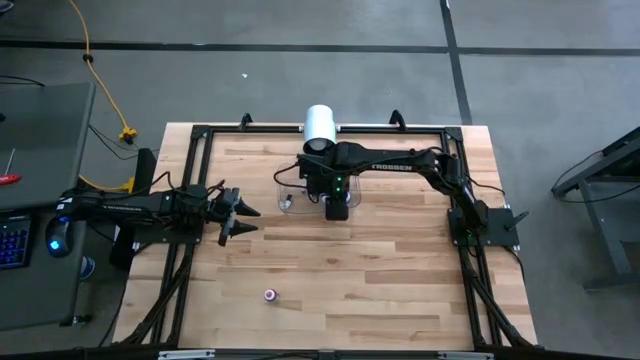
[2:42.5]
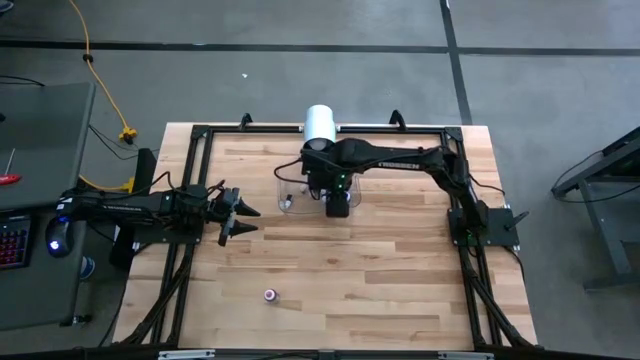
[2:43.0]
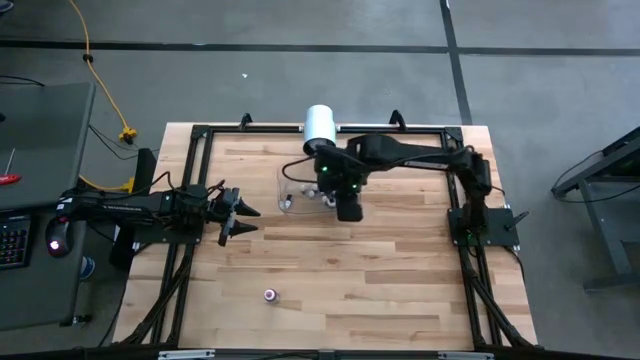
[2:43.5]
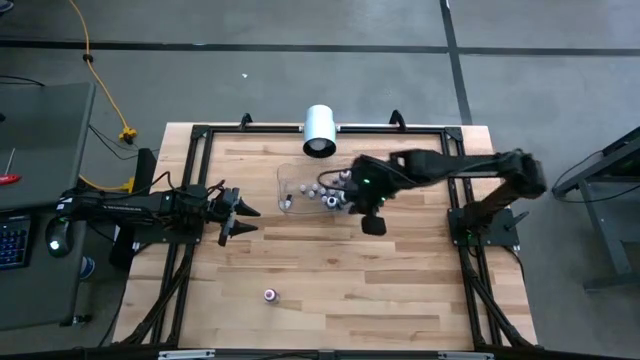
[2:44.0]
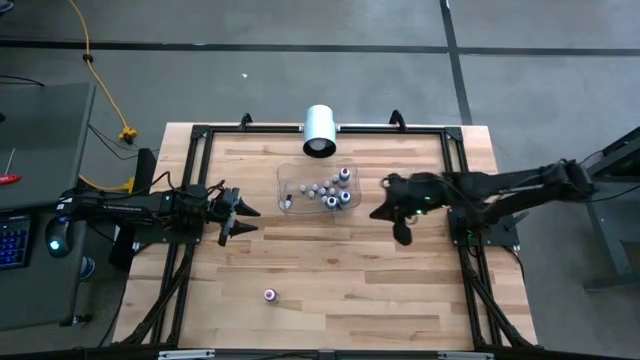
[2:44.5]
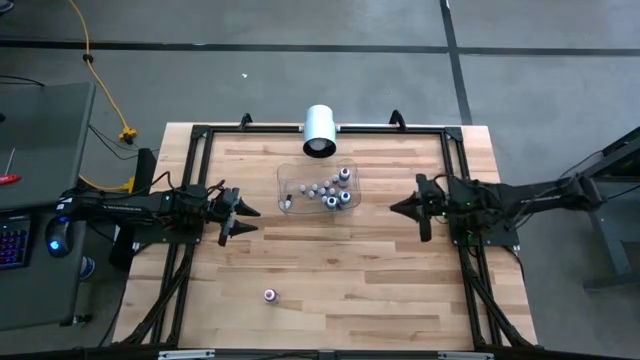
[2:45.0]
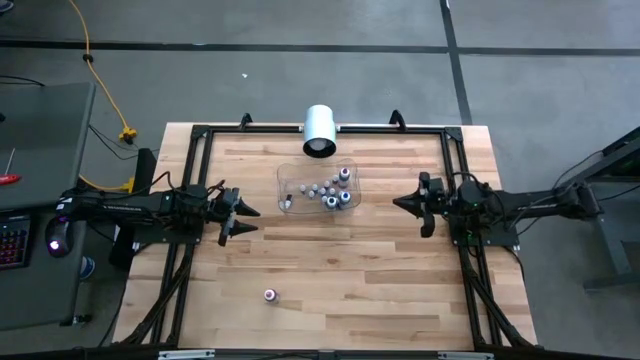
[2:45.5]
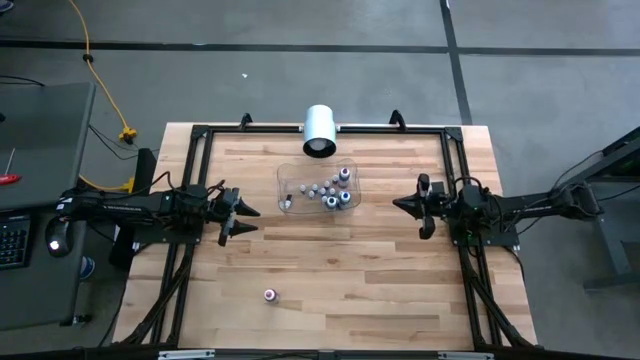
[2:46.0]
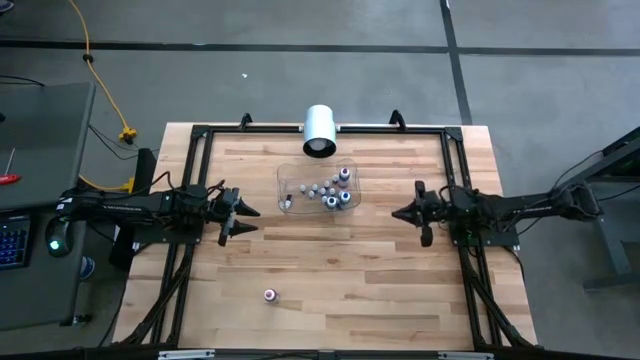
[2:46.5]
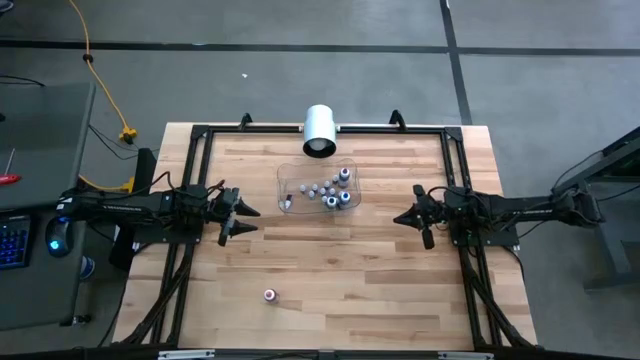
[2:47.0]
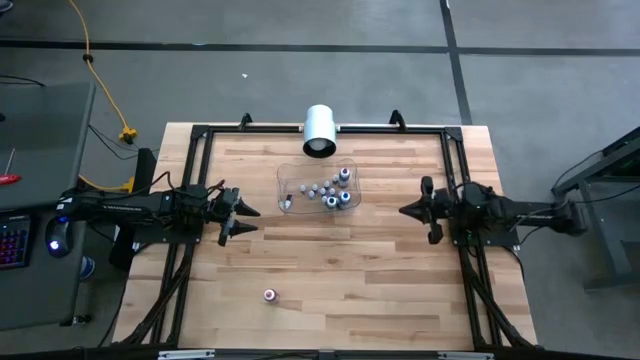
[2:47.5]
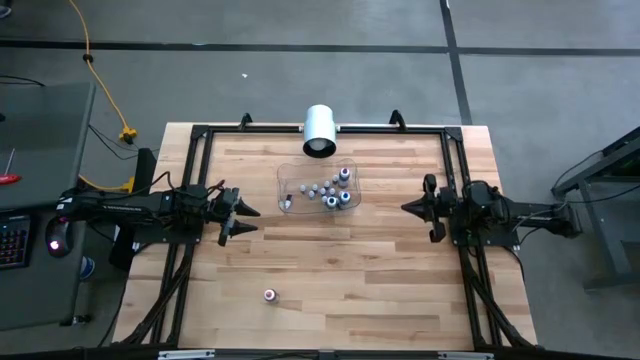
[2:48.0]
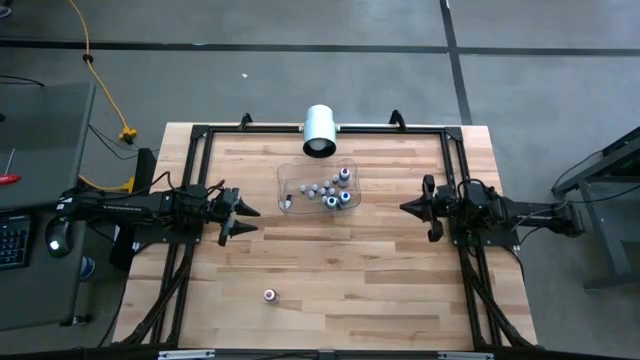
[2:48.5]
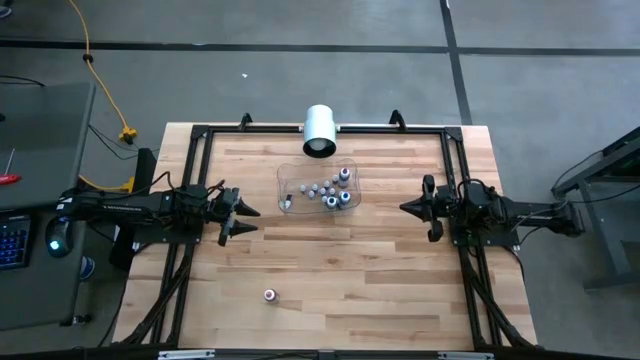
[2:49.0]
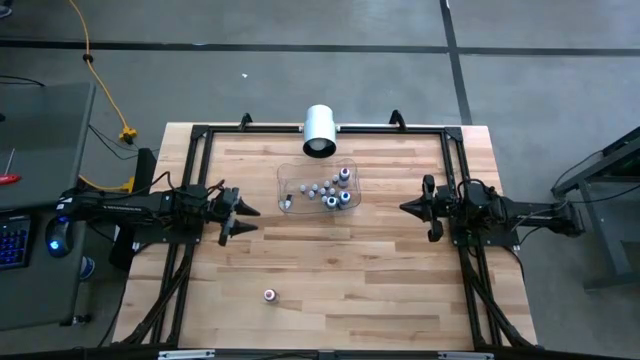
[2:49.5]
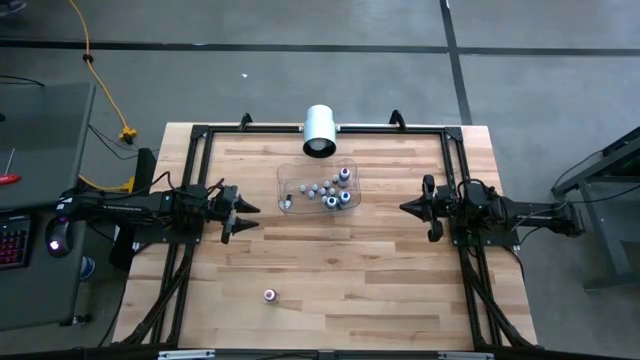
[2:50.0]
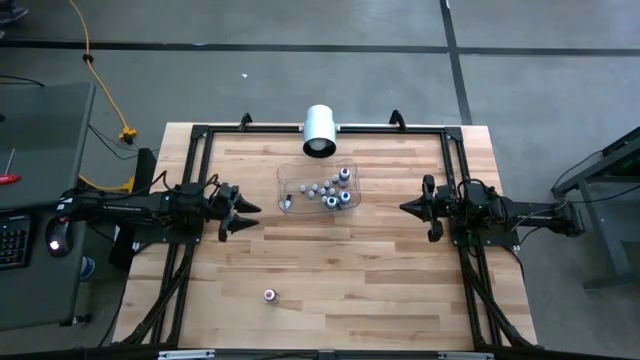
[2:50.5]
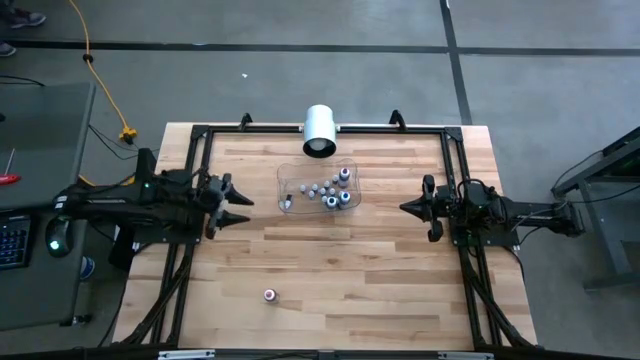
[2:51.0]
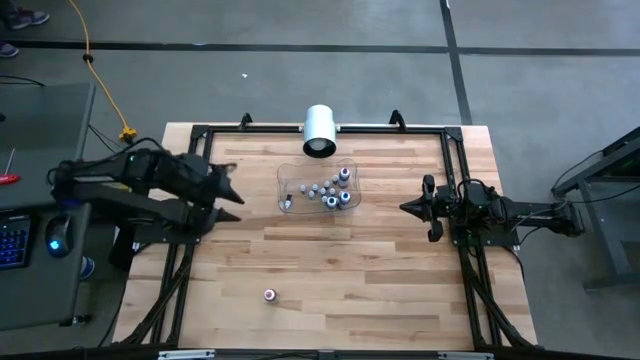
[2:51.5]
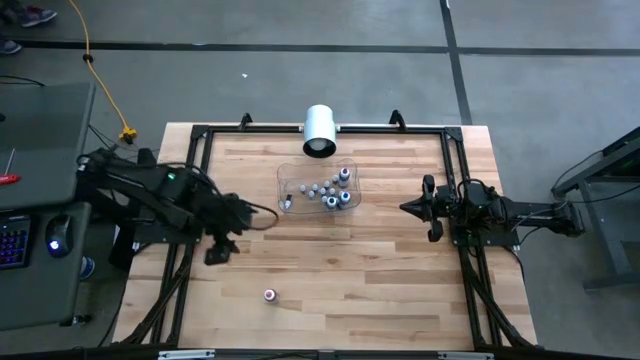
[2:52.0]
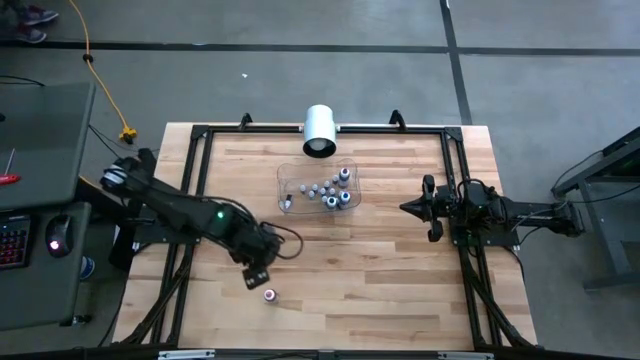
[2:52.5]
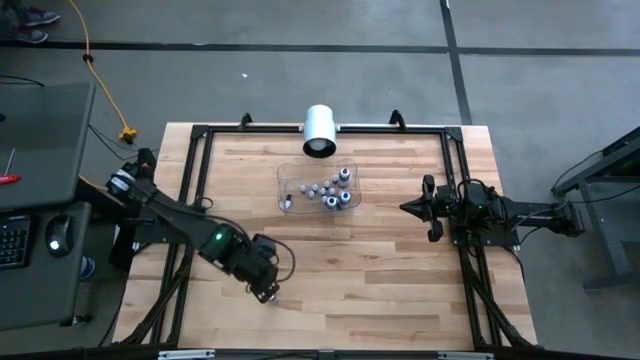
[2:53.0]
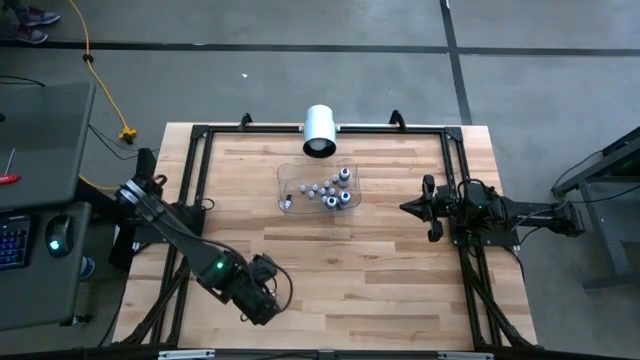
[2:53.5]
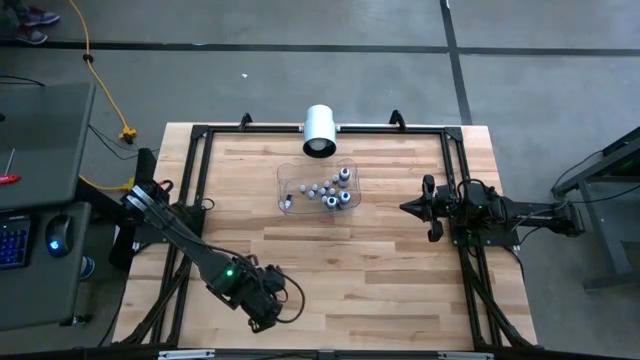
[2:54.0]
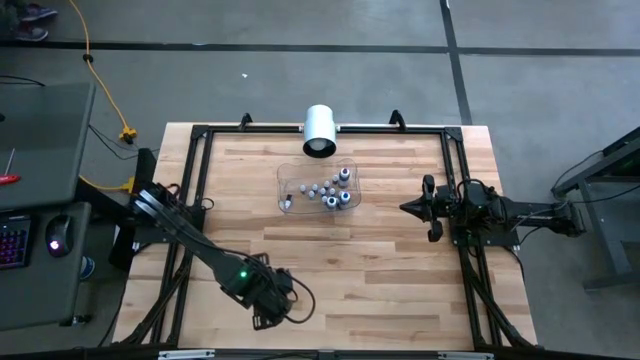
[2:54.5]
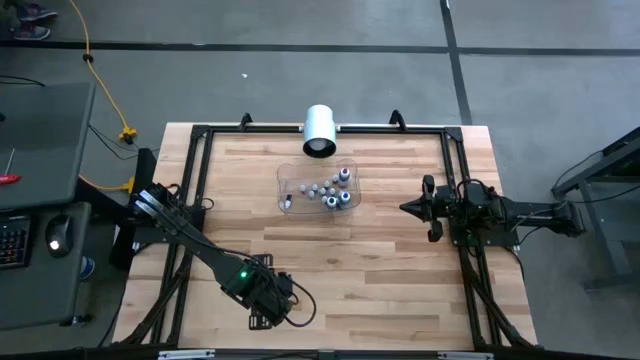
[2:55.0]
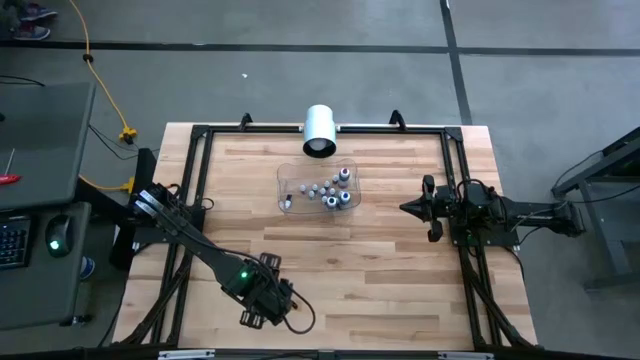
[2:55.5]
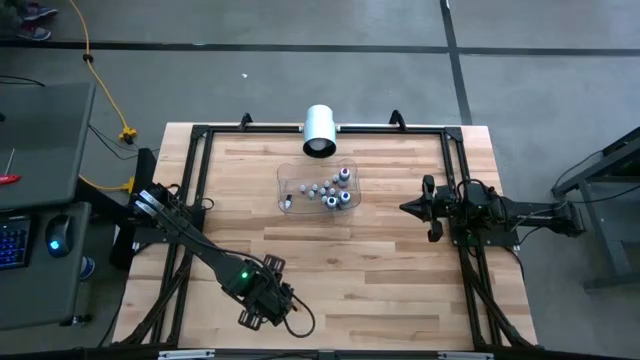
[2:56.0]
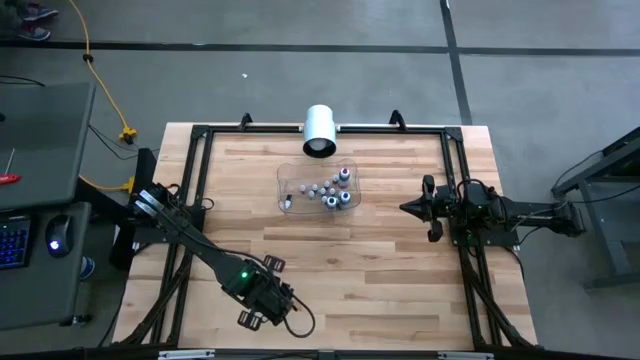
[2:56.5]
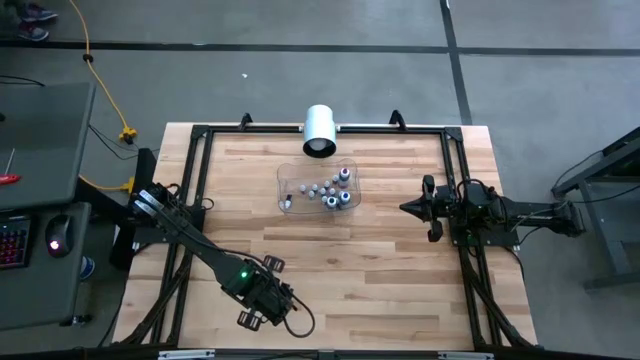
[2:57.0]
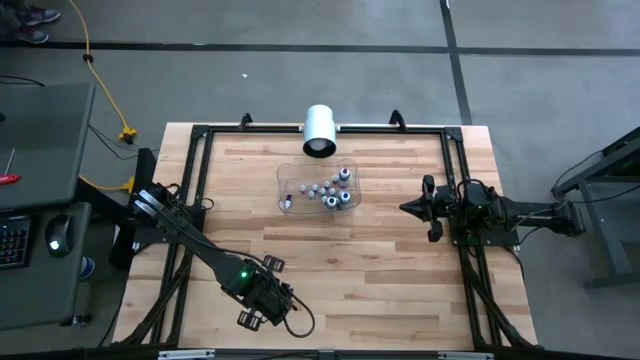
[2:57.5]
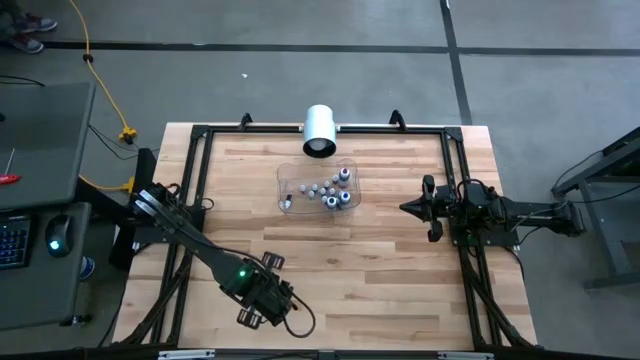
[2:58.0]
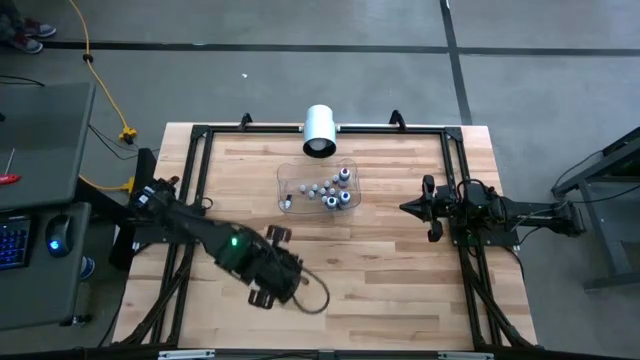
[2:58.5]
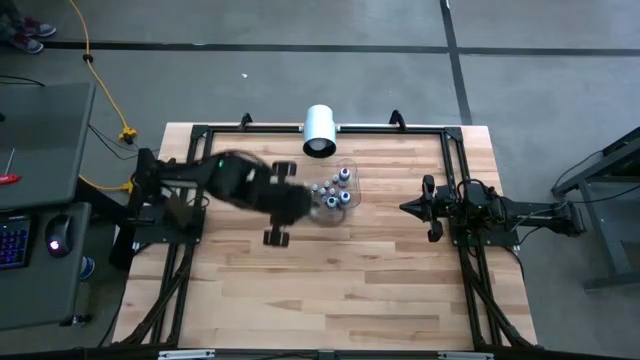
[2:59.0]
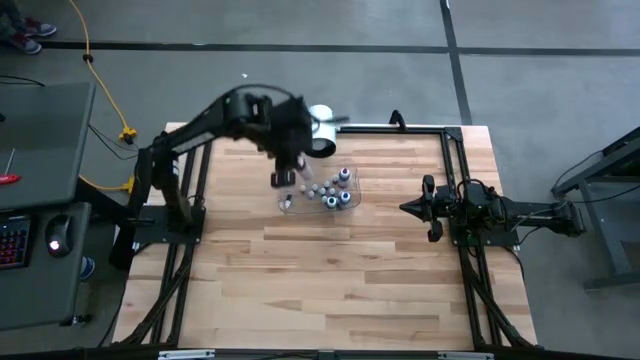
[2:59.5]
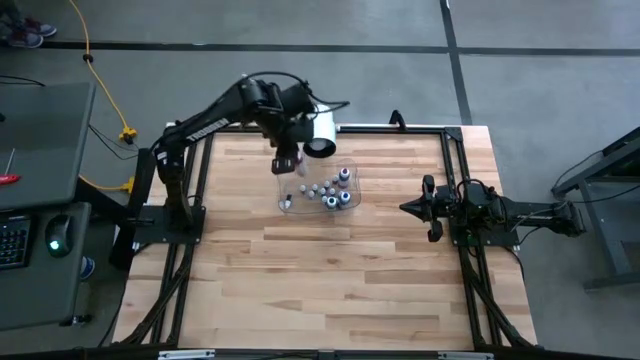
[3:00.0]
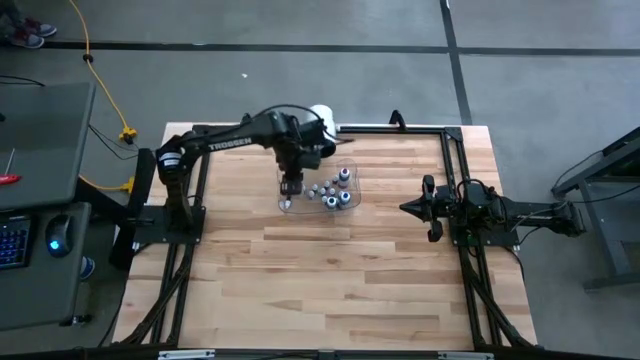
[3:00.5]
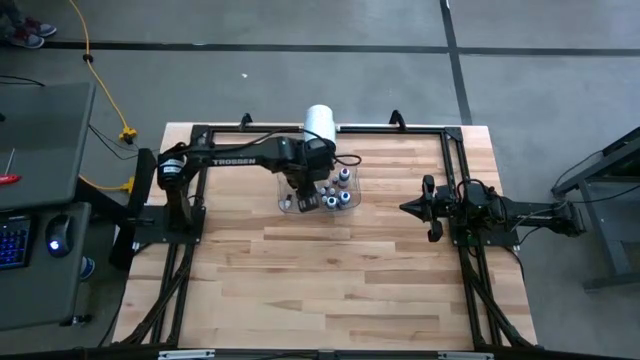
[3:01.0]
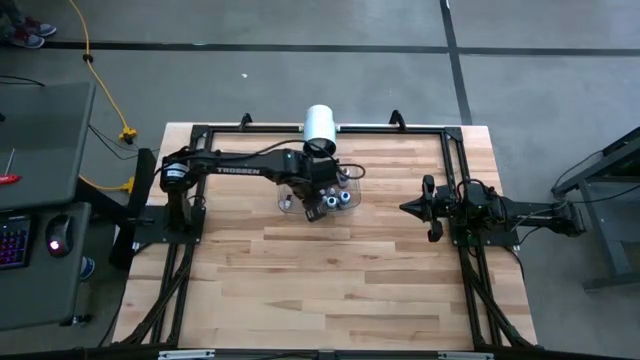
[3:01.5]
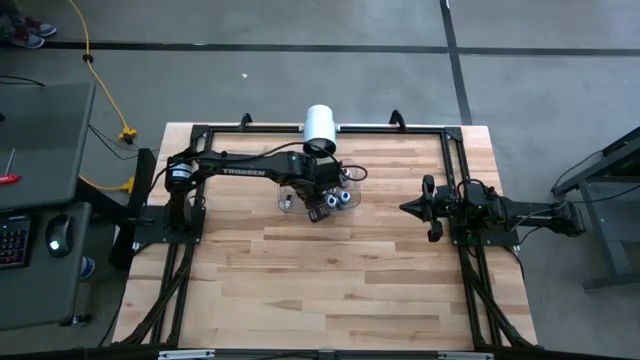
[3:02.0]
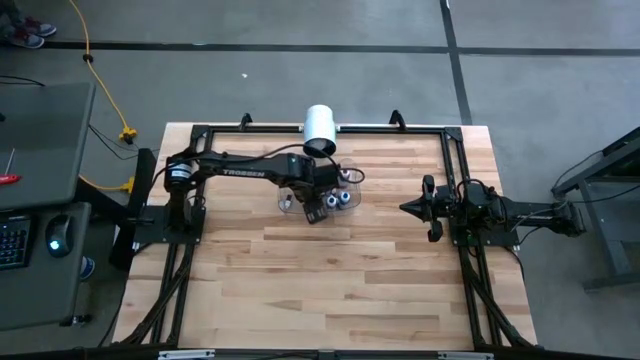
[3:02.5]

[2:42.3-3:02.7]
Task: Pick & Place food coloring
Put the large pink food coloring bottle into the transparent bin

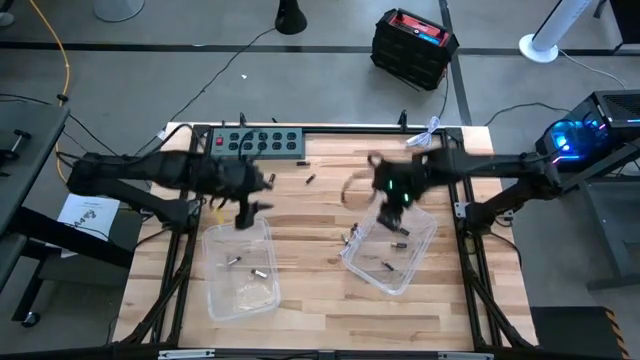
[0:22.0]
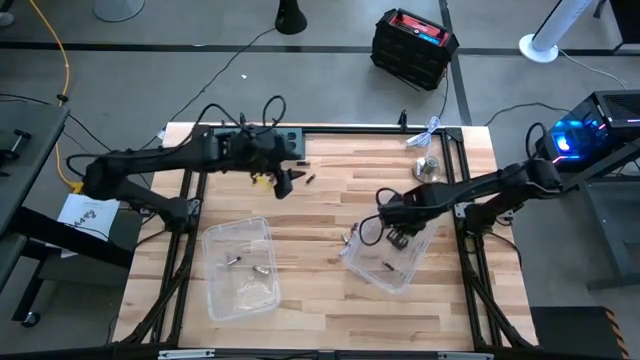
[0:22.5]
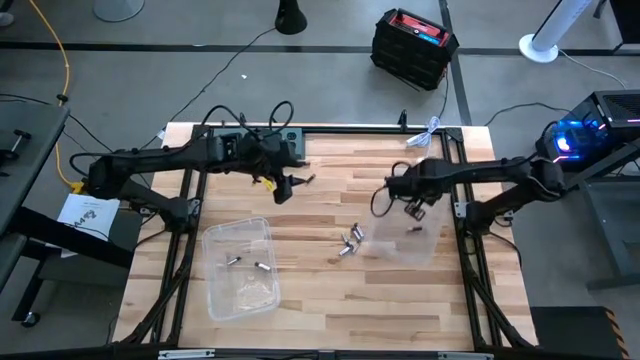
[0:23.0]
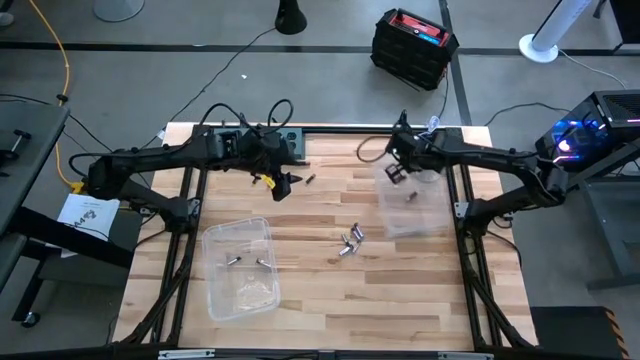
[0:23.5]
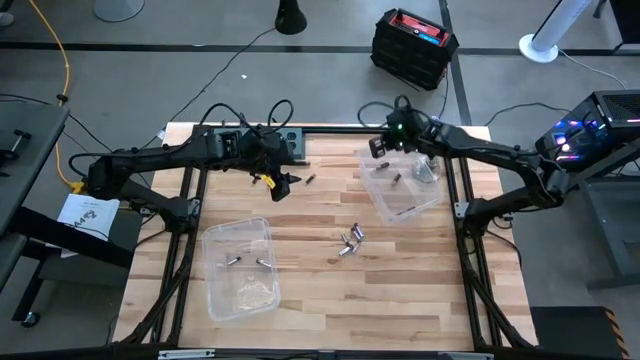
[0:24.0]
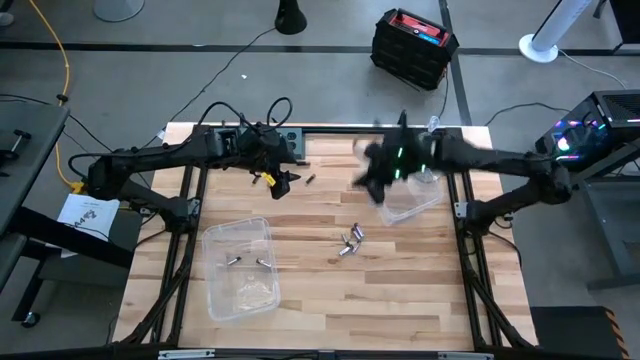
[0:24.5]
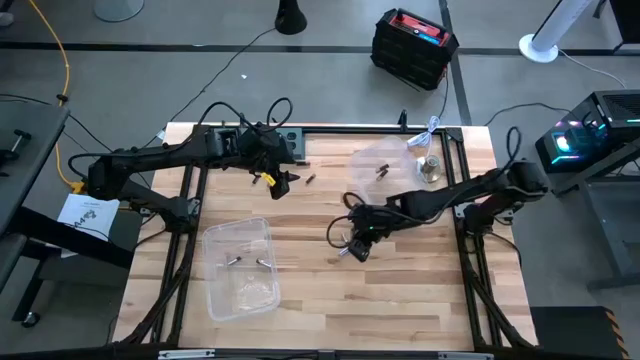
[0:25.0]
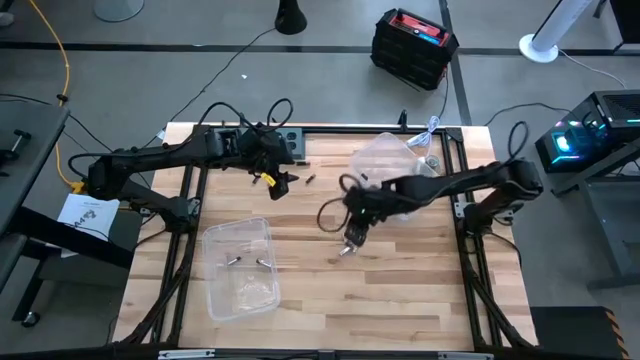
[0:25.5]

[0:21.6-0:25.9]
Task: Sort batteries
Move the right transparent bin to the top right of the table
